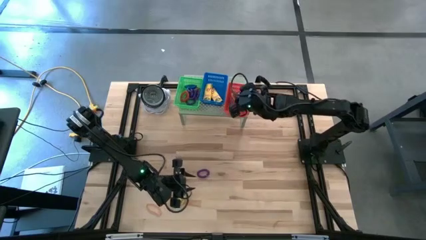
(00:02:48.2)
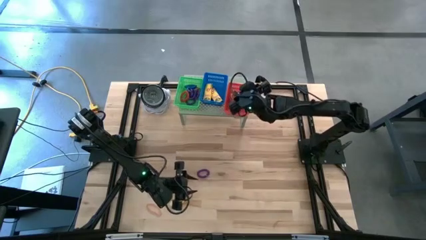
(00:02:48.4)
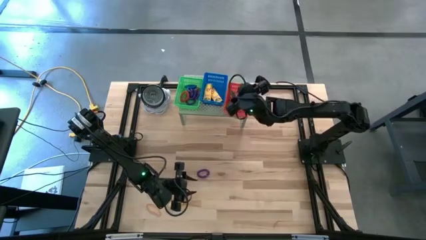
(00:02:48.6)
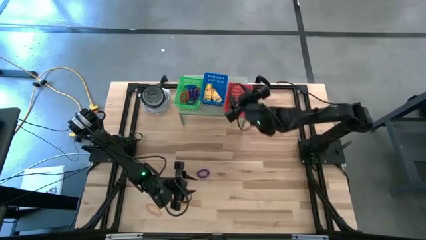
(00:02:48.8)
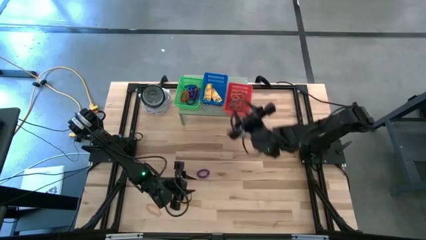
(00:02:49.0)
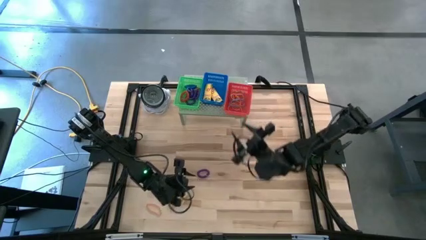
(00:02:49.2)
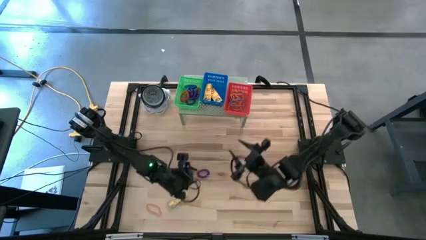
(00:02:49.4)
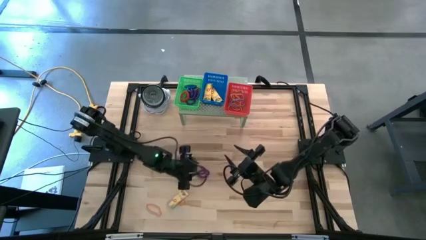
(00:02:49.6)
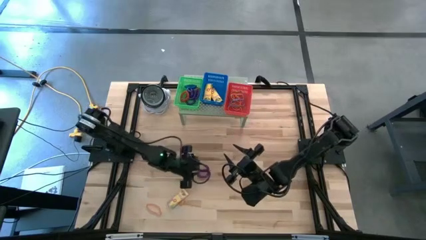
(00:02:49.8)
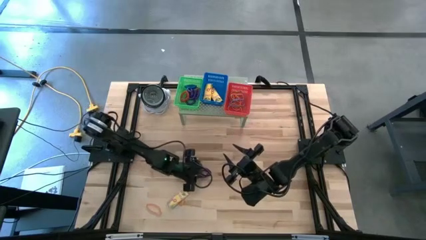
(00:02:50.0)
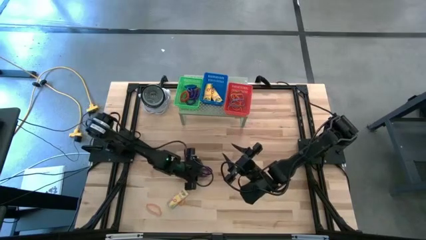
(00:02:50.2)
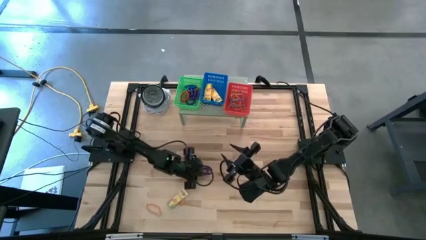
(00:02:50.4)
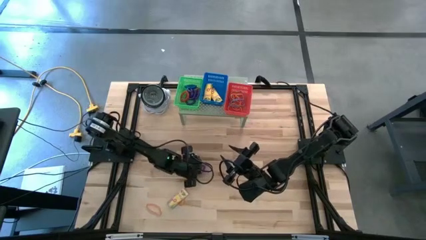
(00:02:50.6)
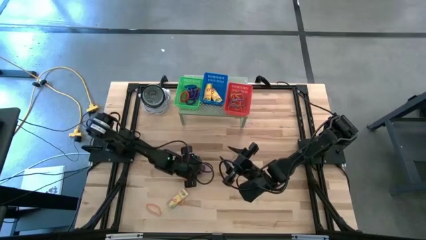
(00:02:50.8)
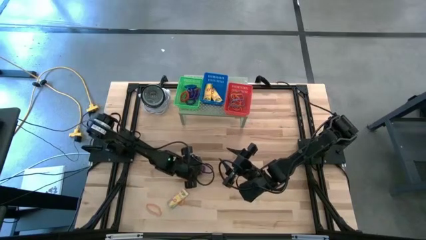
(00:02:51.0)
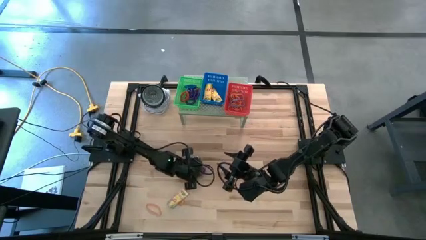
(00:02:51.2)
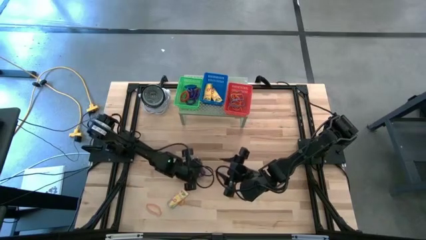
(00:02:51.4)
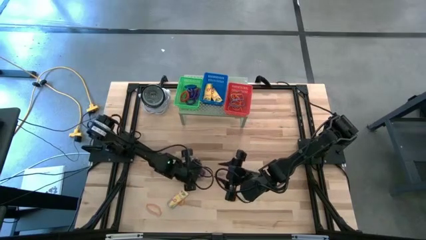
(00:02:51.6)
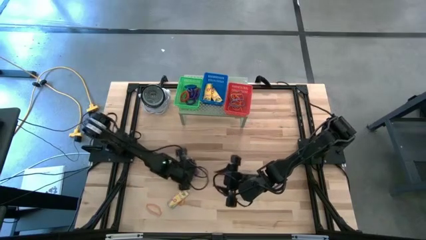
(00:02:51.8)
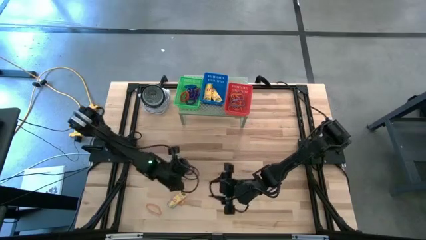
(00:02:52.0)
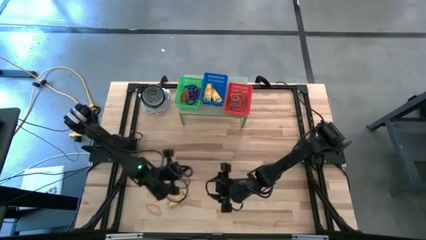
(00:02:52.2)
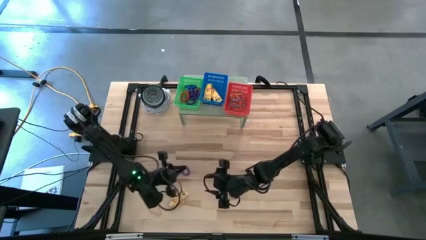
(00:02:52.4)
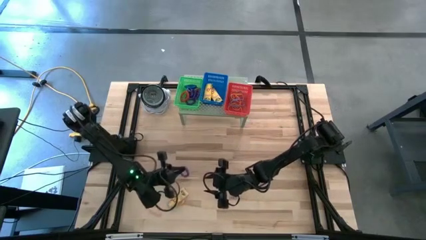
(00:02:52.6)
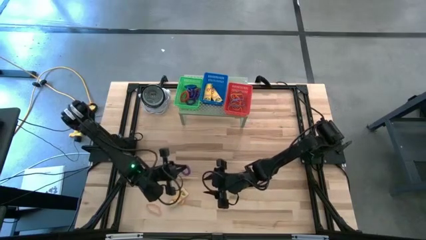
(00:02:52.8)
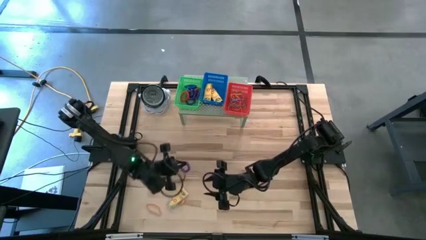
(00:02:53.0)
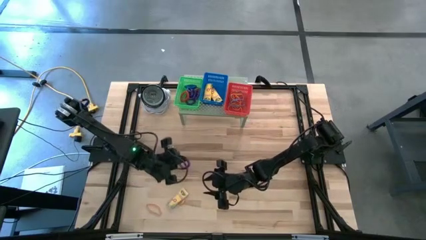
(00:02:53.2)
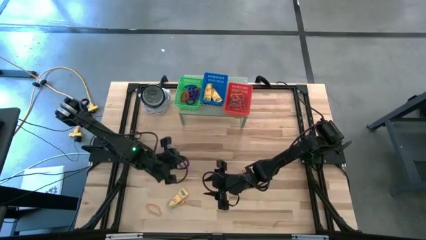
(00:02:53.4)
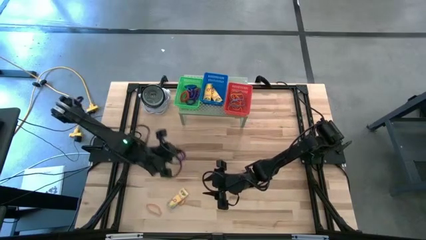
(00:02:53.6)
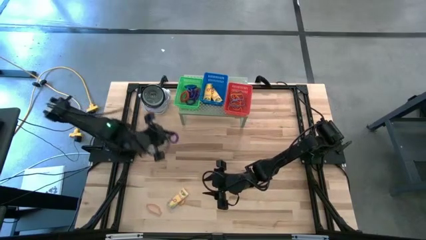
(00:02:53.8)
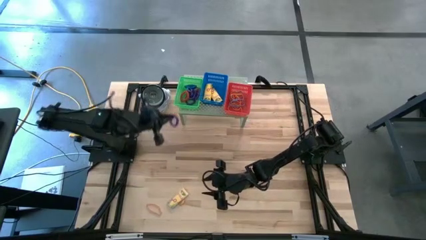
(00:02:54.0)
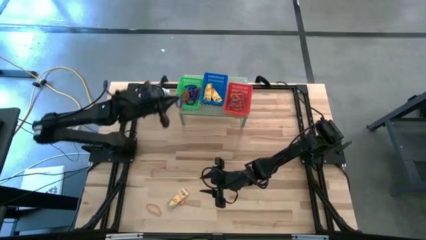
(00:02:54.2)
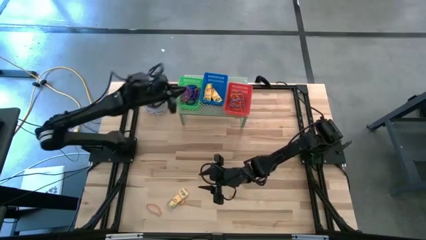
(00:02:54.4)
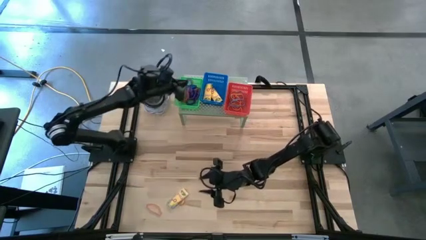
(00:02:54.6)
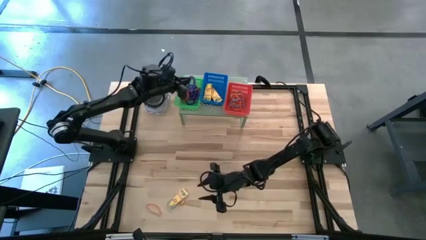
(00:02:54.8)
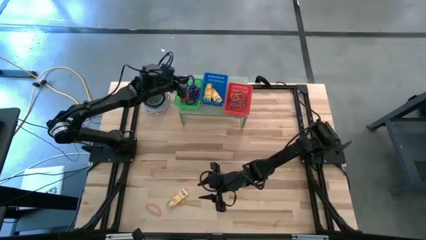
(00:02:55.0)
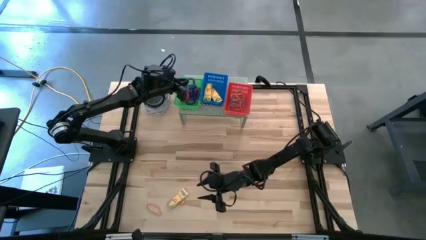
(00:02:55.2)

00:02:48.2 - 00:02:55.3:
Task: Pick & Place Office Desk Supplies
Put the violet spring keychain into the green bin on the shelf

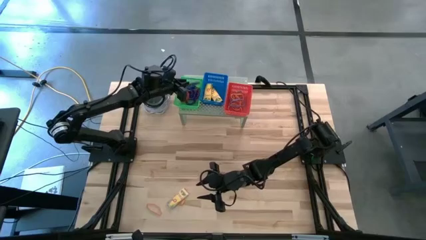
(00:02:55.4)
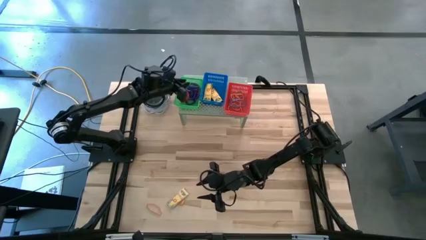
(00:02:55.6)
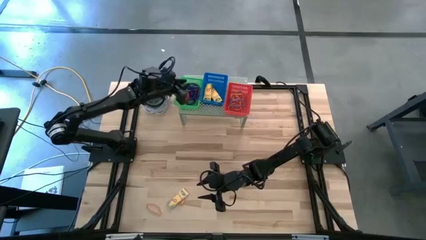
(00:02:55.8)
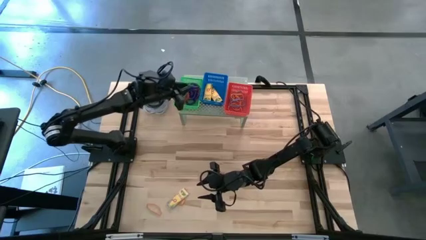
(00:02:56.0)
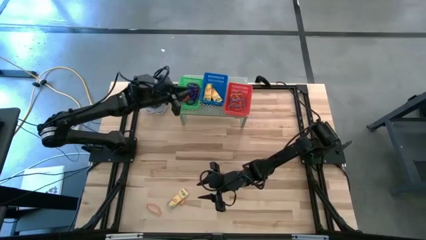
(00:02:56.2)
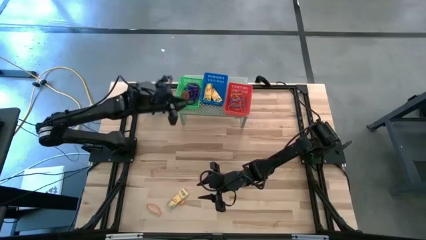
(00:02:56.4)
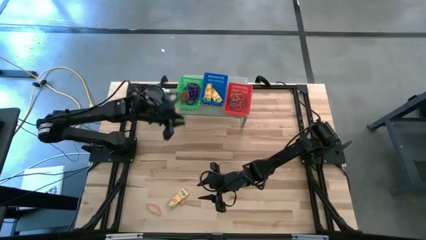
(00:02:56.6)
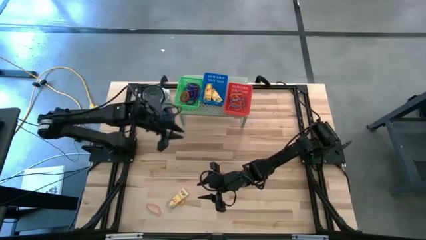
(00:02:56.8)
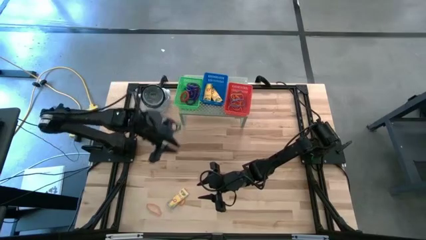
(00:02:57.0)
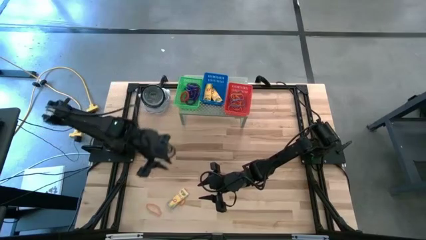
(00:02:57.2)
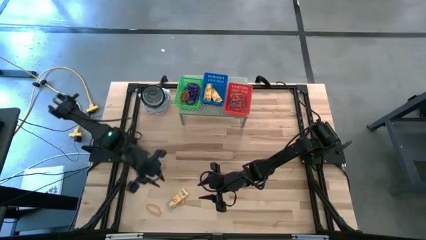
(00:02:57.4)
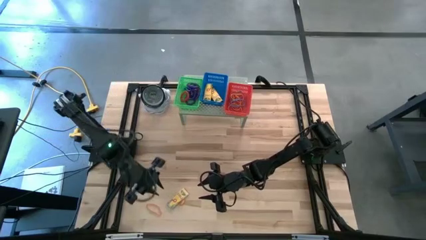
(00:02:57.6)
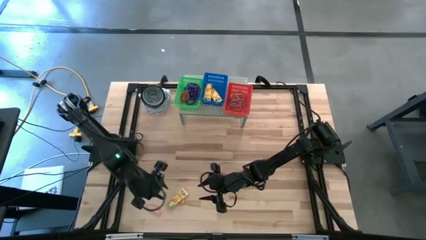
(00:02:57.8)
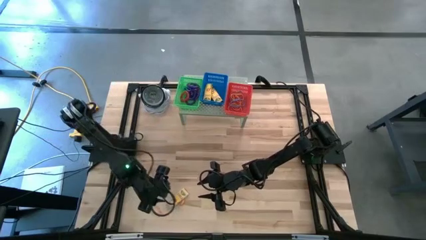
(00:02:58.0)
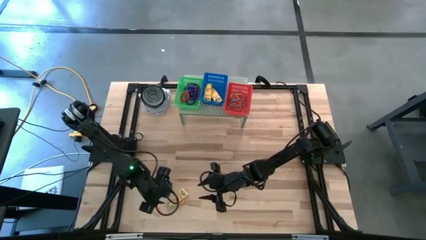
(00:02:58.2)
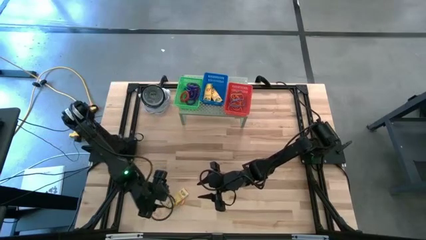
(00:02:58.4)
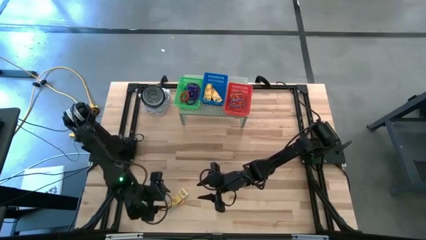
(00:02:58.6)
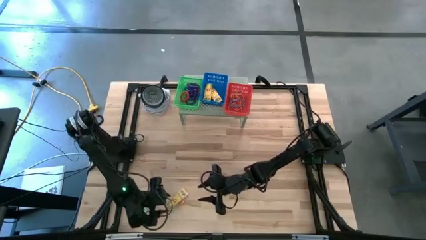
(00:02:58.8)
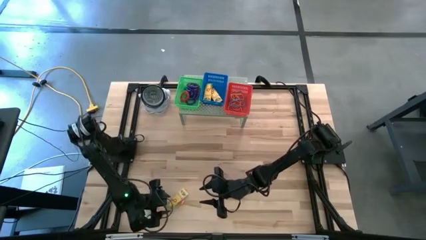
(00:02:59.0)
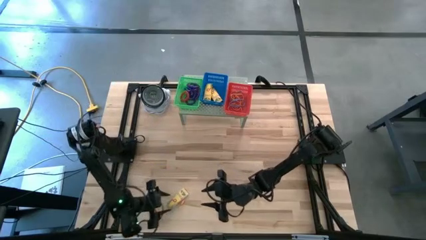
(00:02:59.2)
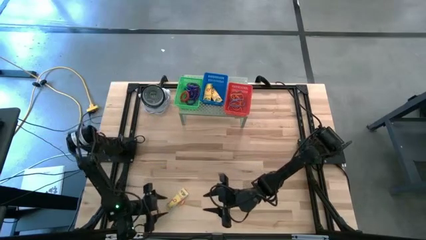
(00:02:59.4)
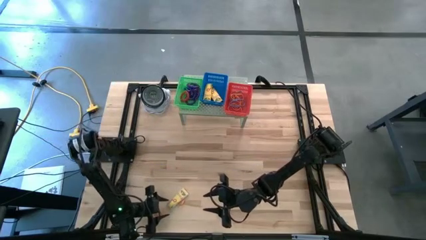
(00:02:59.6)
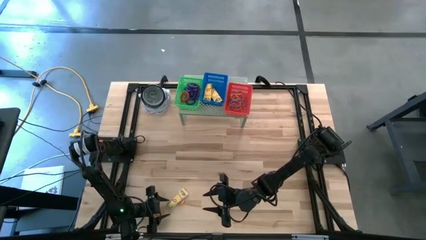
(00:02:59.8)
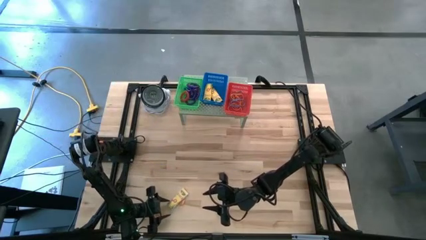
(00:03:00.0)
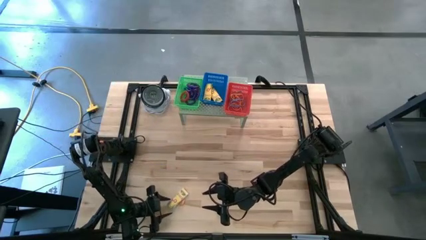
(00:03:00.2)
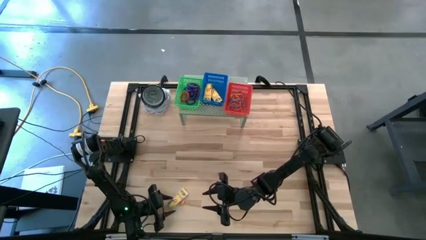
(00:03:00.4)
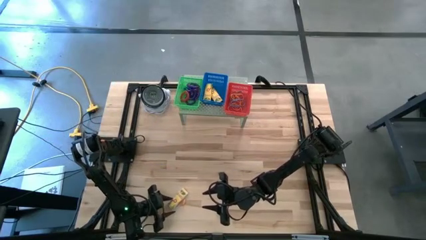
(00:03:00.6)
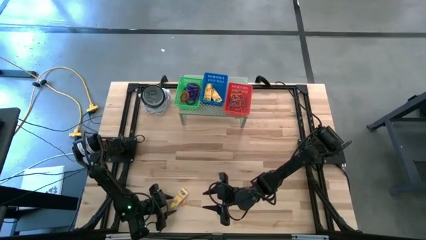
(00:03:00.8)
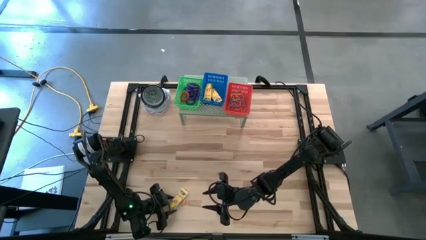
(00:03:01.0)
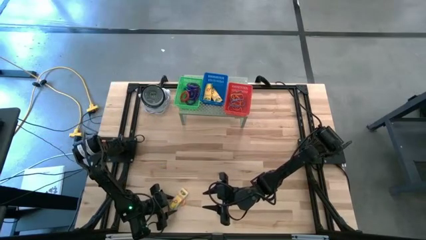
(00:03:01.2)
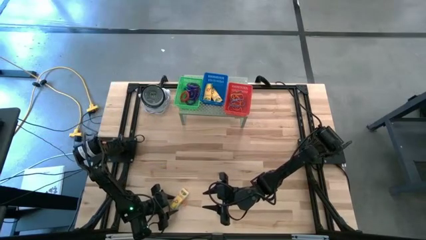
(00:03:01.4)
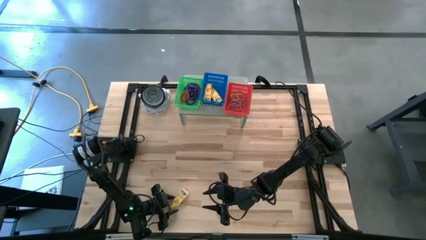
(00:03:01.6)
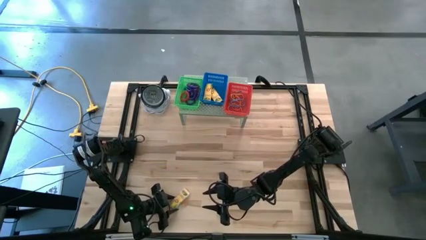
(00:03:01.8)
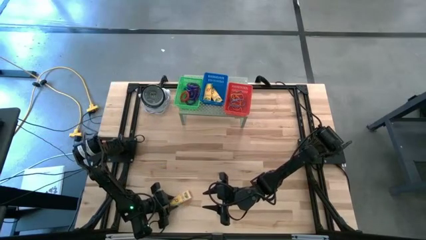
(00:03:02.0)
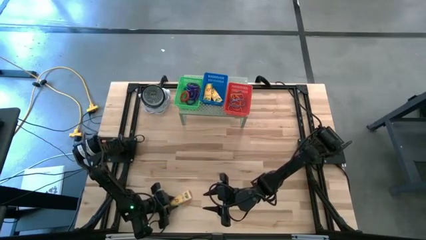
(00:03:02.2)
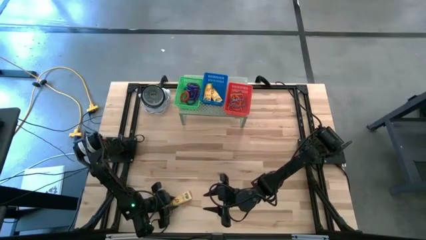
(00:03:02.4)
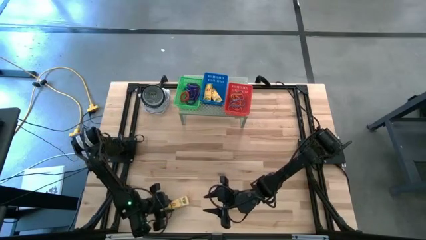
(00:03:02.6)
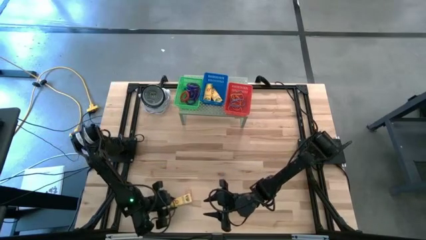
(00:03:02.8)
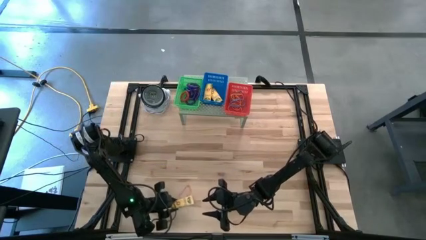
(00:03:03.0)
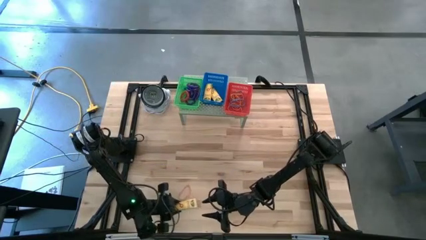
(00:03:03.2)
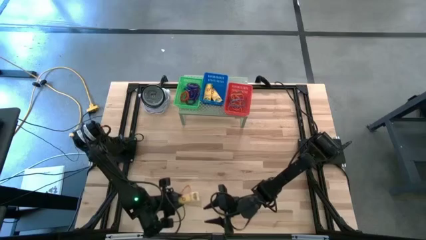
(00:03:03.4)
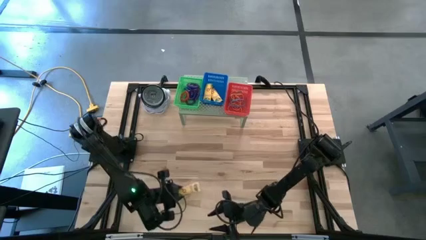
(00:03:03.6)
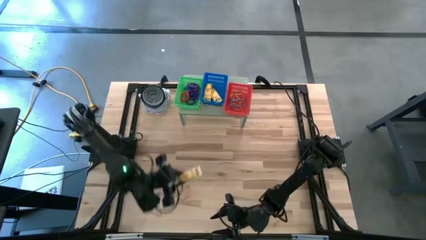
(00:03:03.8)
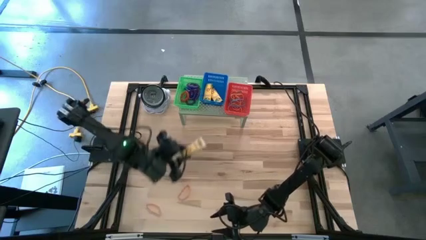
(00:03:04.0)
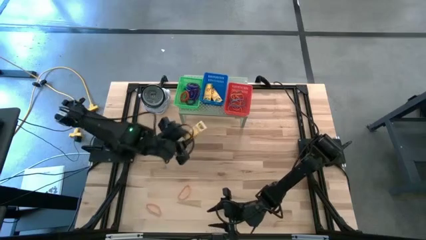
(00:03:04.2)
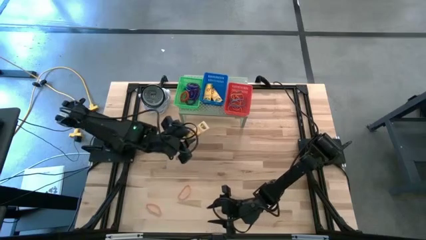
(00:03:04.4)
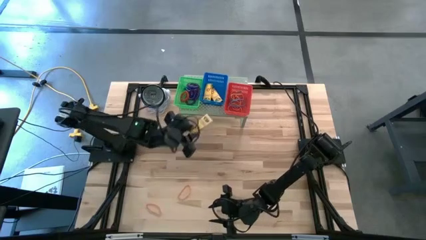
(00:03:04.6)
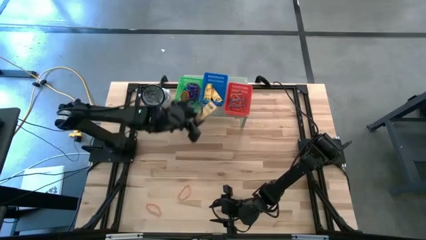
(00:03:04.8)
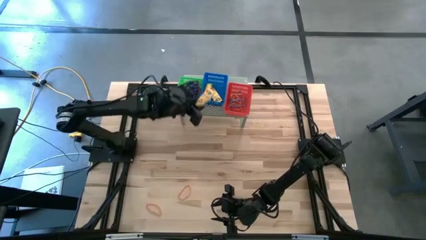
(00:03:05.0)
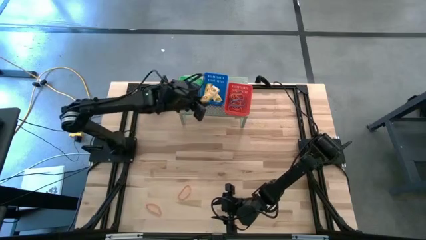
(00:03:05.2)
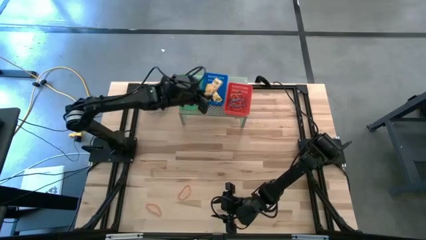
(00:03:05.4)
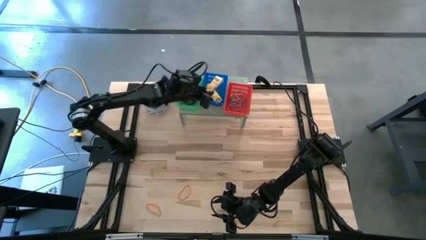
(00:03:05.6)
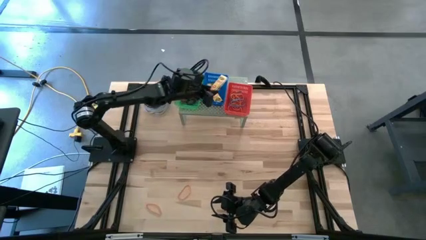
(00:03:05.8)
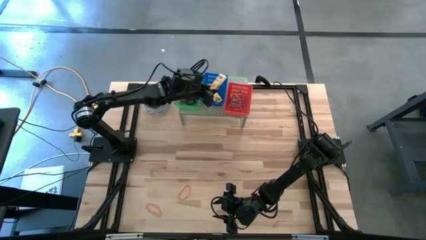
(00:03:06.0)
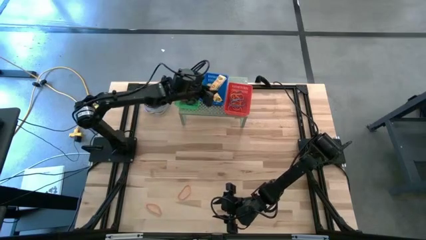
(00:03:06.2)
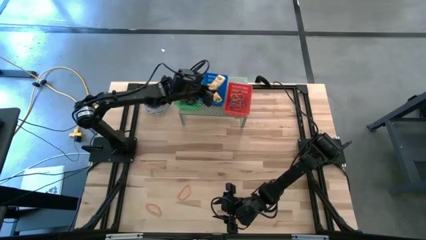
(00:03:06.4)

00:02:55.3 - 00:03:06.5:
Put the yellow crayon box into the blue bin on the shelf
